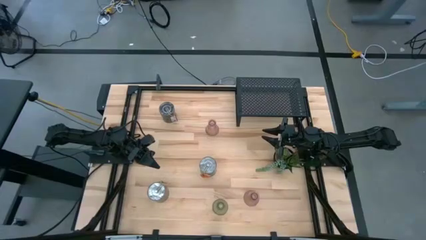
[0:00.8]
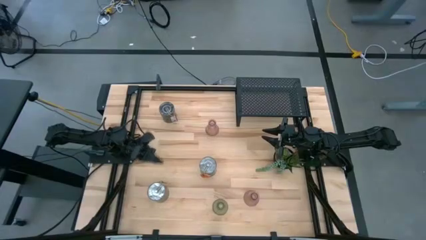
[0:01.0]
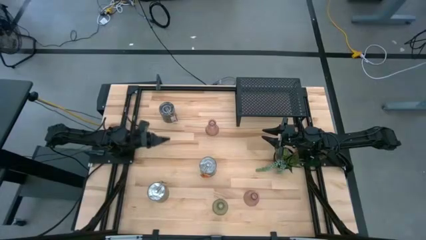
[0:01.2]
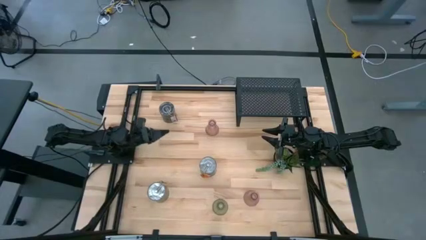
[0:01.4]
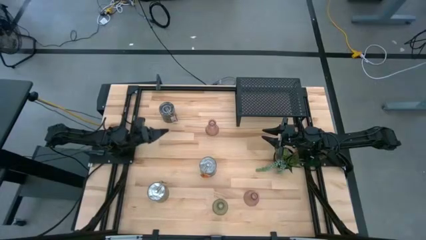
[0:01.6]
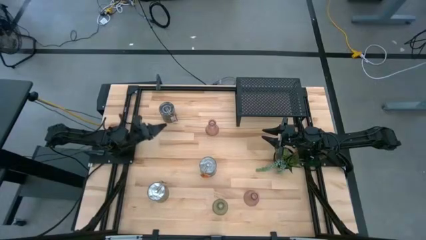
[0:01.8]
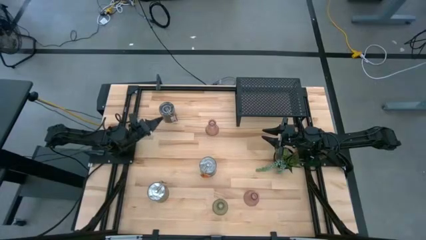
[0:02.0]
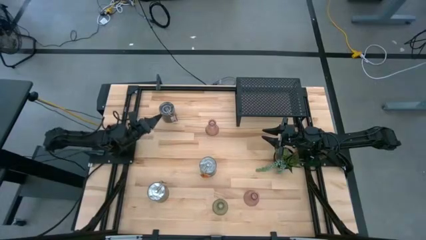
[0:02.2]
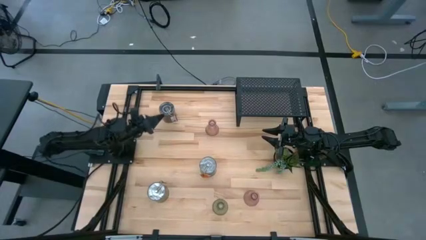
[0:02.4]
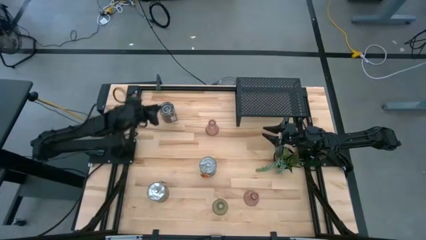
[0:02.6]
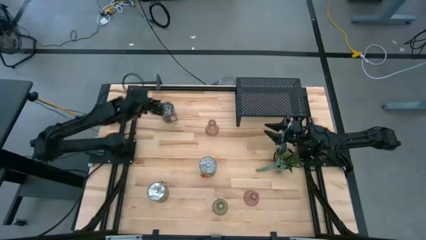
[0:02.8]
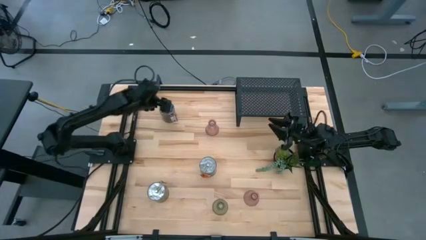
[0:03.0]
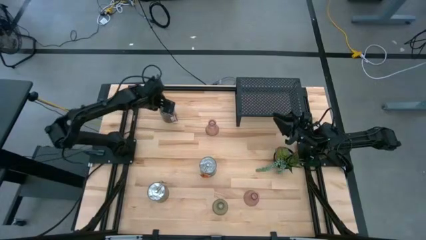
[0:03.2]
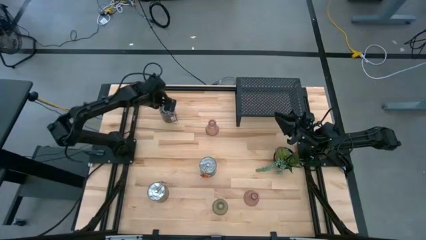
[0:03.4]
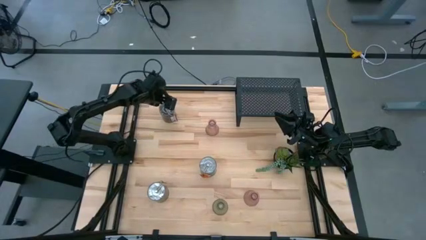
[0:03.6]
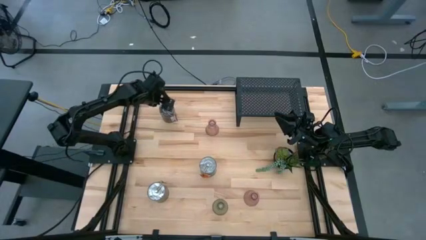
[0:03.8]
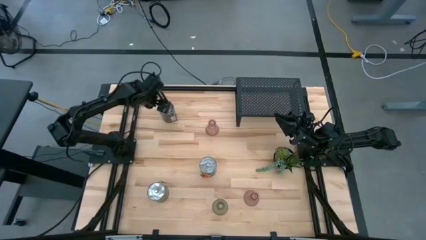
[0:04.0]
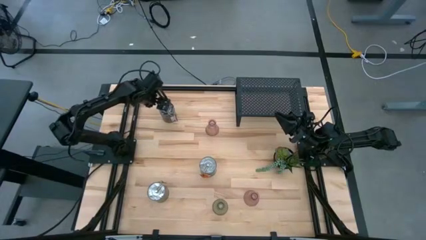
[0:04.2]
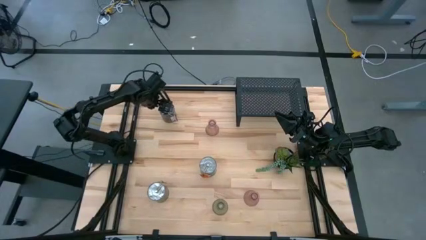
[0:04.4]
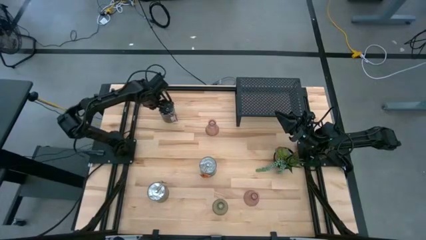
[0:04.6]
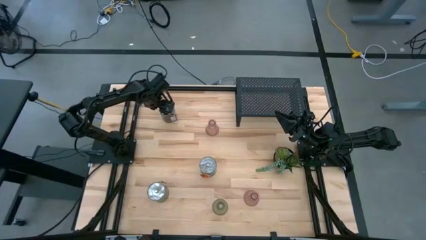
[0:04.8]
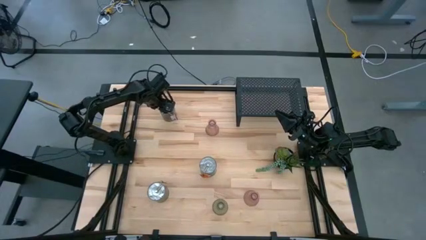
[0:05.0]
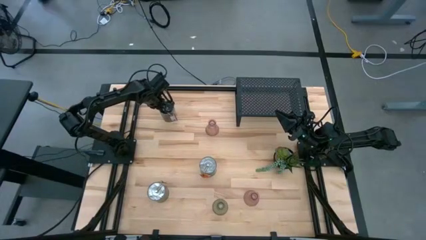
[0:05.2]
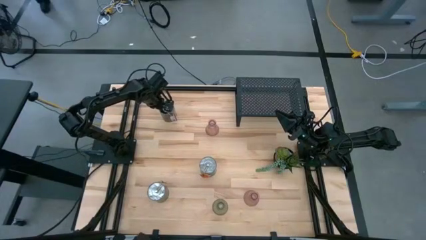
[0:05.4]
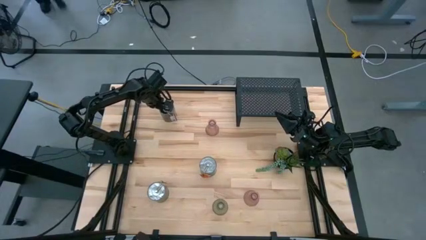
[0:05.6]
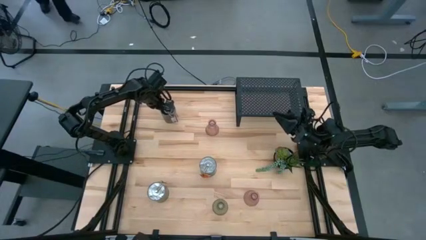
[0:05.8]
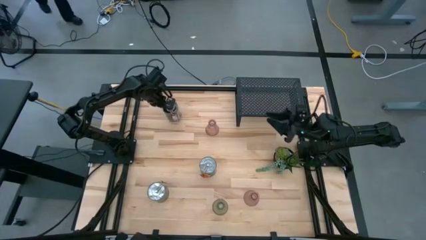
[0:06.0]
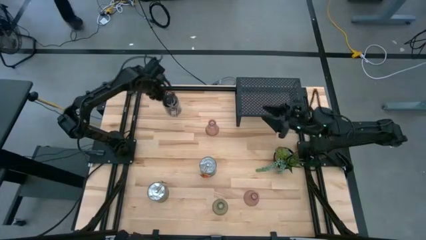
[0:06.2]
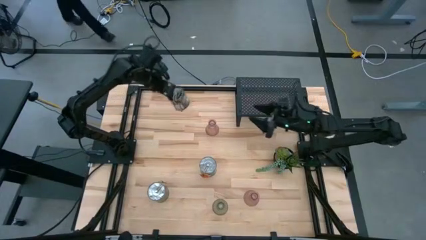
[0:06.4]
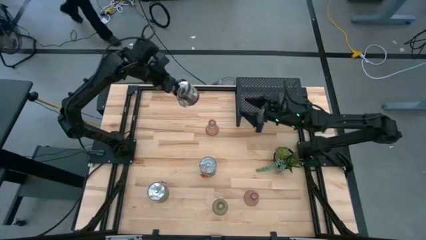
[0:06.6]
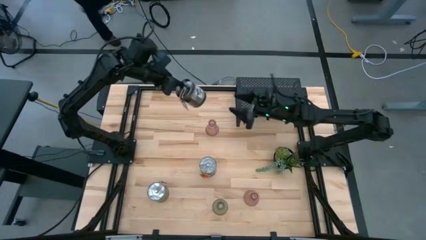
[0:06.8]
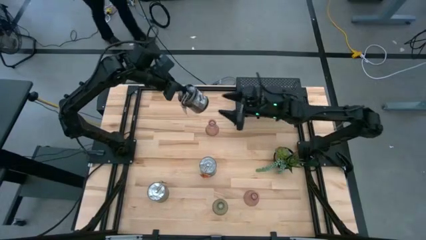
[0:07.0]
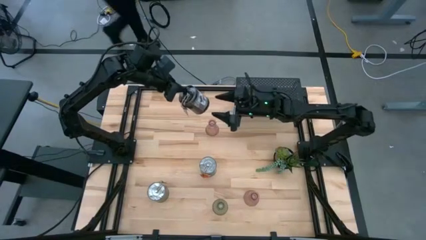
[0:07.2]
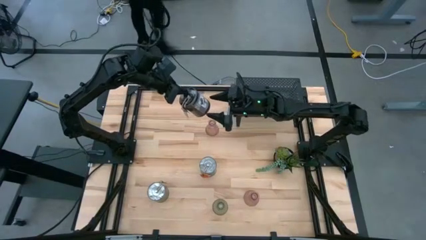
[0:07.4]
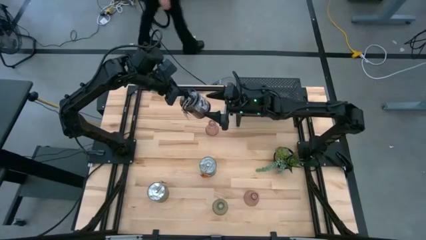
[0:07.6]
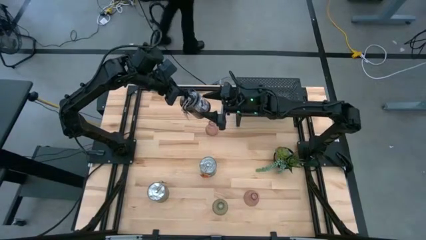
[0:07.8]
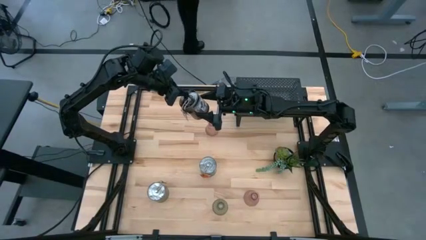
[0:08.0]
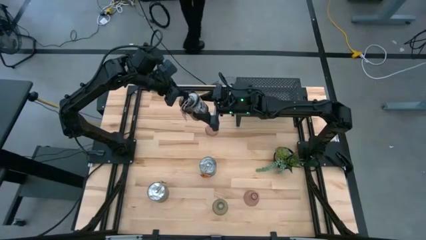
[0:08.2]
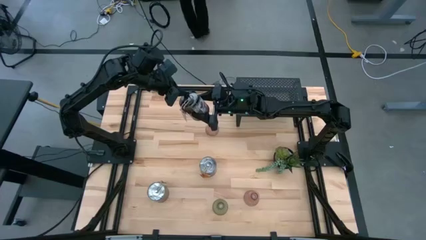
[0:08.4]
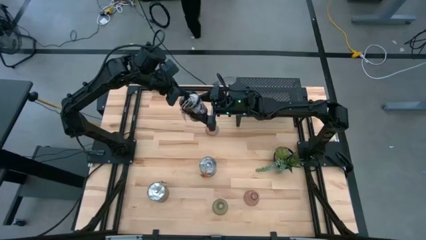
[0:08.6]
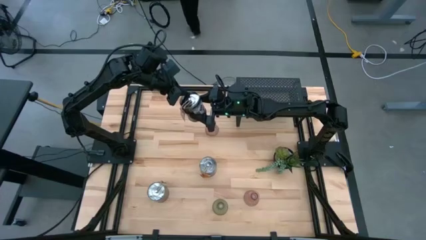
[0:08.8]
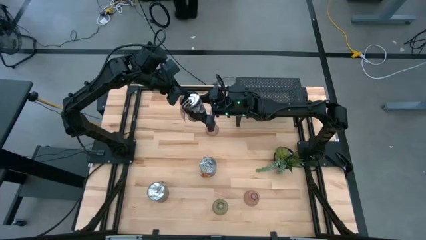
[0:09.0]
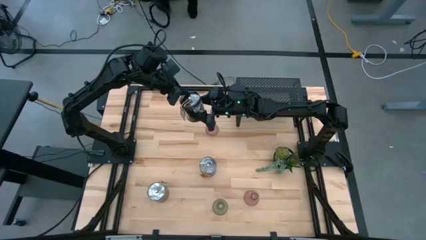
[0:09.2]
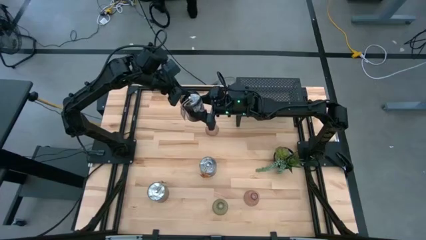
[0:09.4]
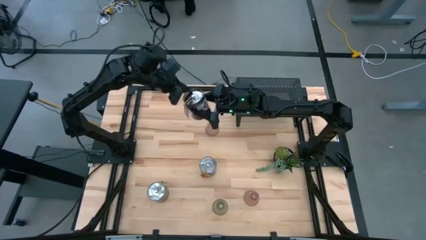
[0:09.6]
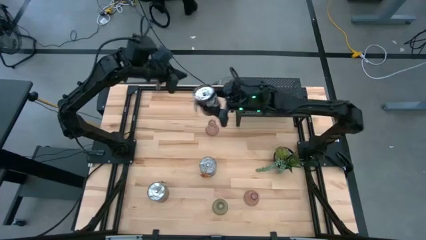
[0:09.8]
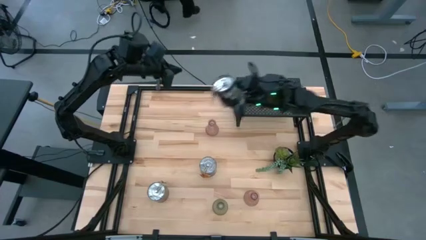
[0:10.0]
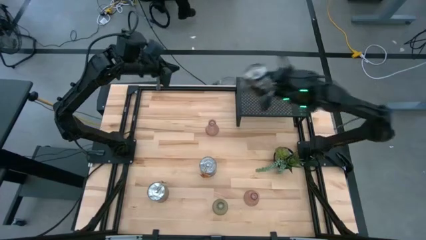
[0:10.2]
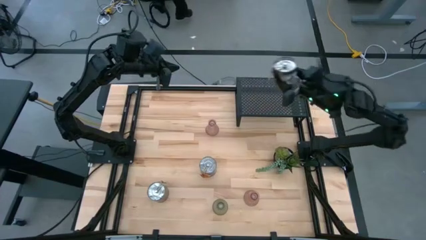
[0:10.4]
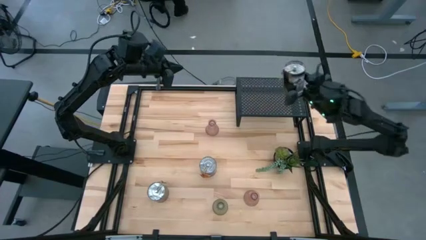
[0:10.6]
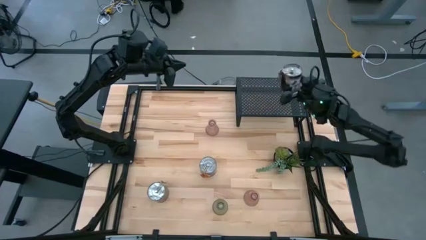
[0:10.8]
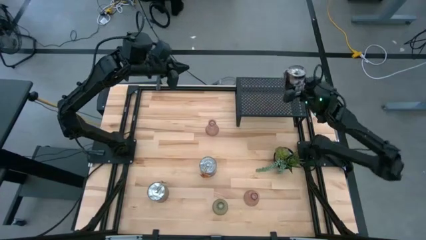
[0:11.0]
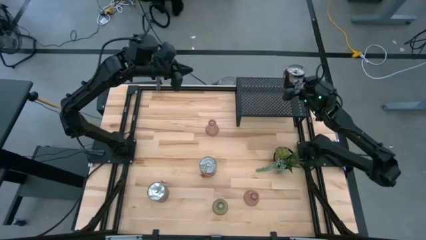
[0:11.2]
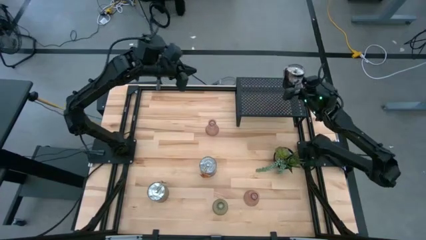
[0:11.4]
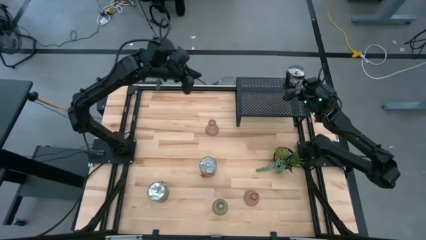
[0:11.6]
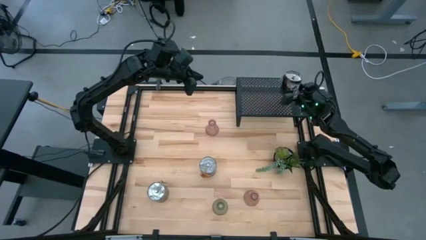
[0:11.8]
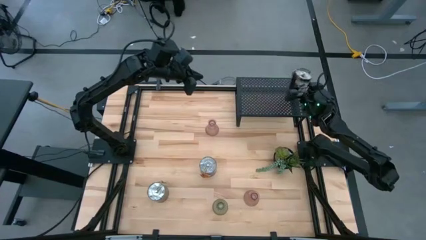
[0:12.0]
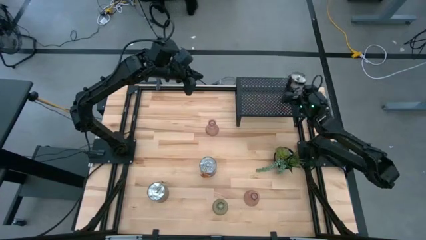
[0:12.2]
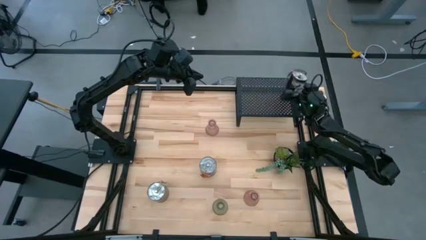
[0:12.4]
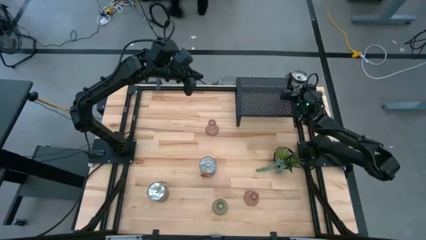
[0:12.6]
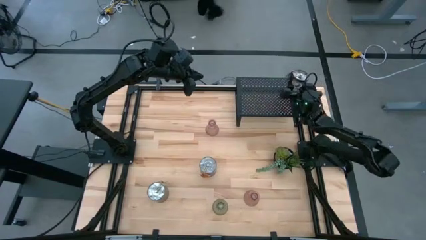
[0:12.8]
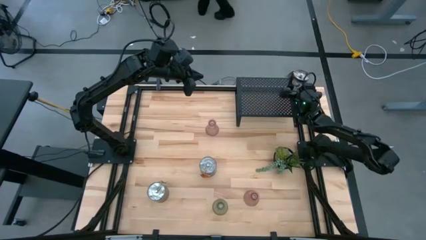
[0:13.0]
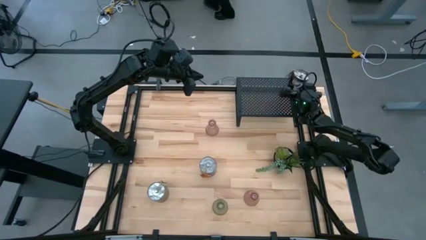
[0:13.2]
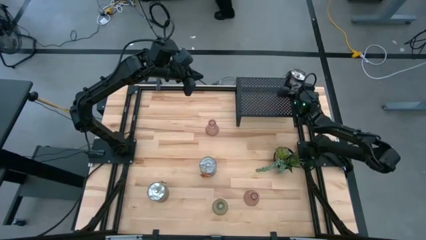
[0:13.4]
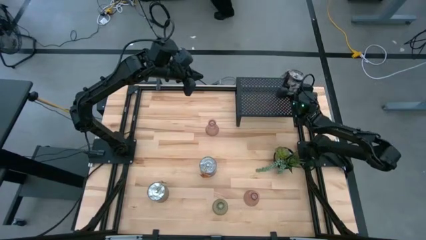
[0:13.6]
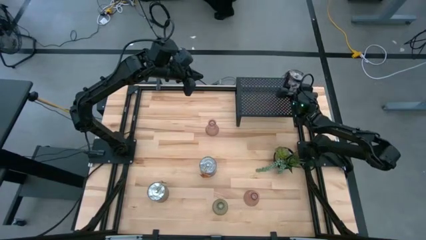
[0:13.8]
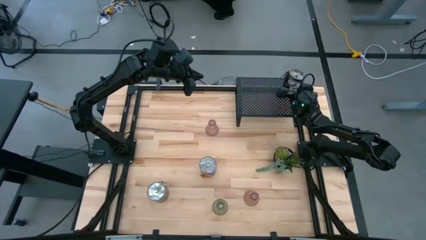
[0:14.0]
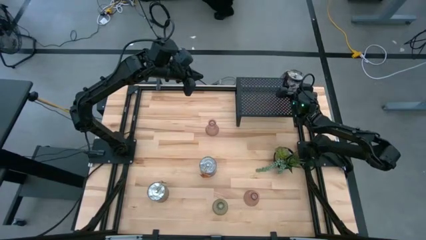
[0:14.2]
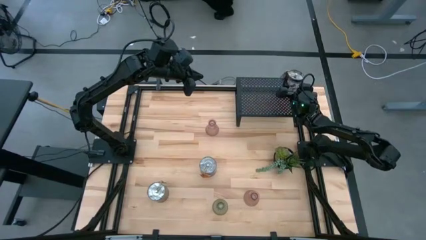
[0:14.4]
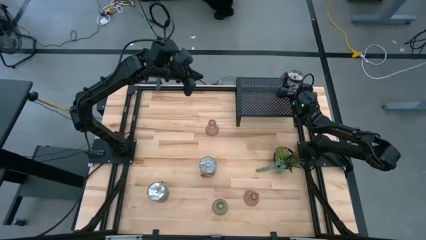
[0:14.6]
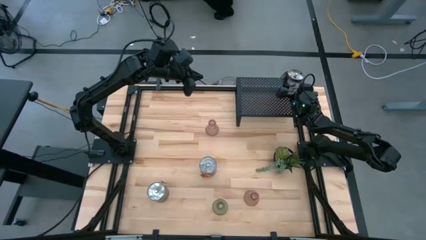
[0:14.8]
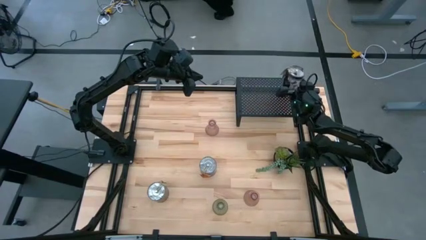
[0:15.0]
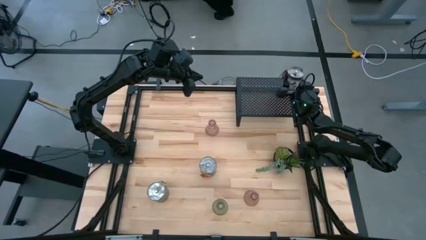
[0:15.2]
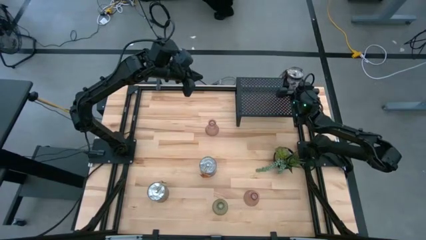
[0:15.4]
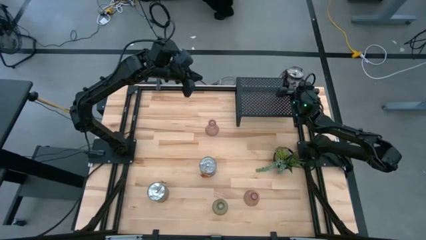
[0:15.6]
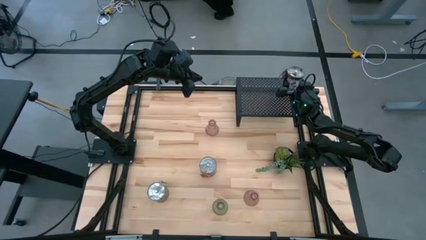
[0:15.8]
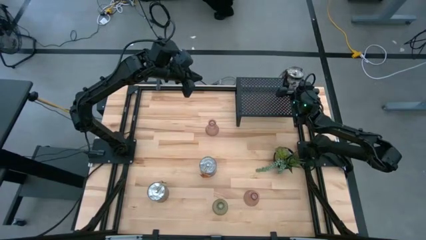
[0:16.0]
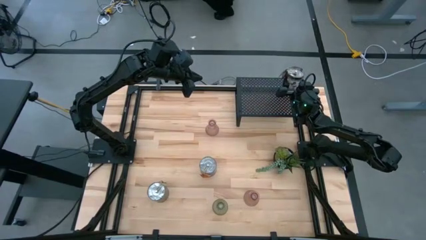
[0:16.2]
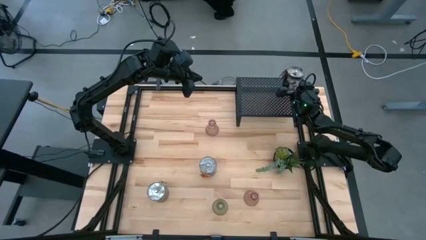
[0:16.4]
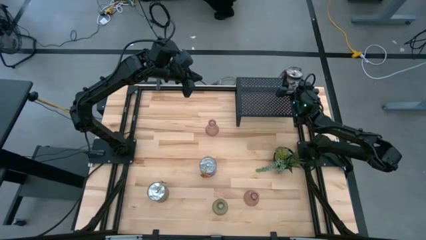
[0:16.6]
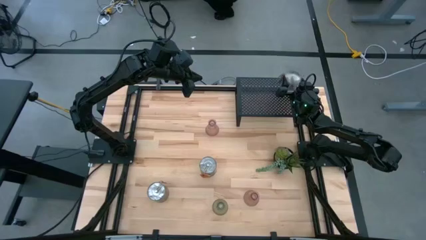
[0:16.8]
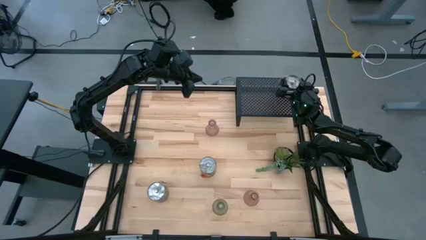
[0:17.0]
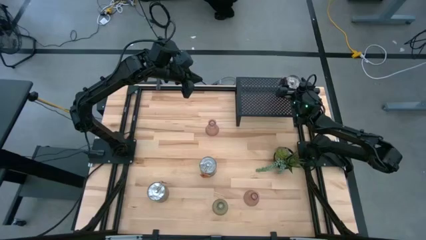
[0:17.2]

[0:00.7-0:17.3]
Task: Pick & Place candle stick holders
Put the top silver scented candle on the shelf
